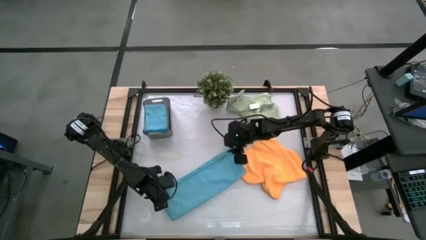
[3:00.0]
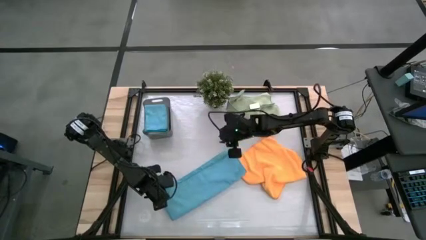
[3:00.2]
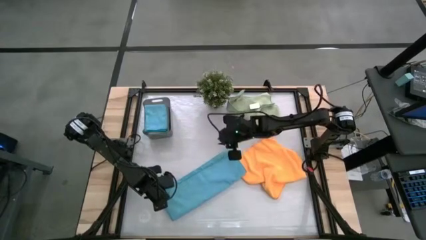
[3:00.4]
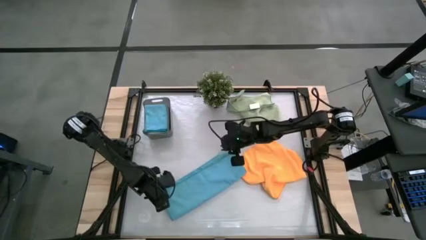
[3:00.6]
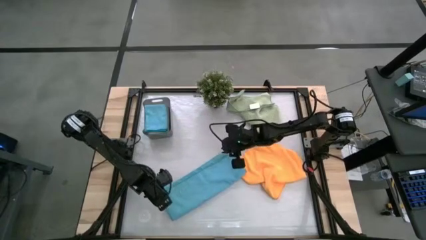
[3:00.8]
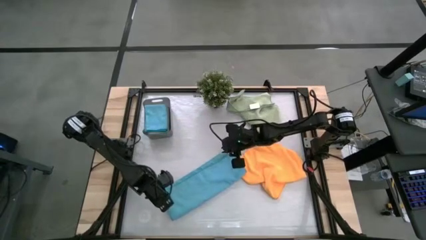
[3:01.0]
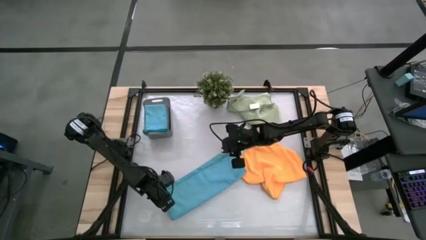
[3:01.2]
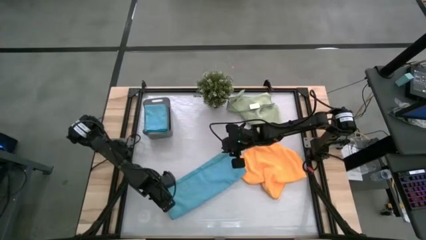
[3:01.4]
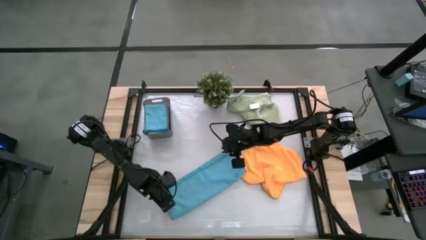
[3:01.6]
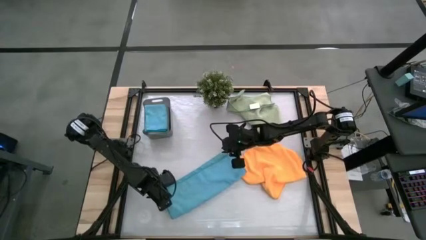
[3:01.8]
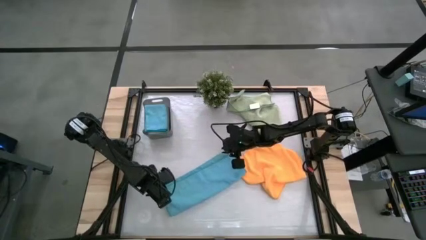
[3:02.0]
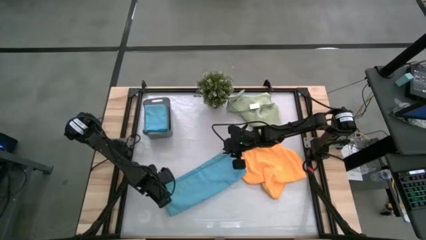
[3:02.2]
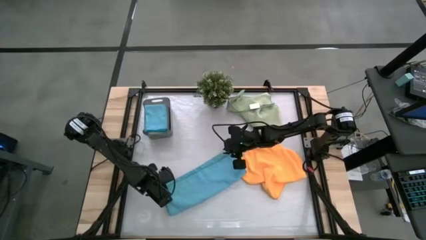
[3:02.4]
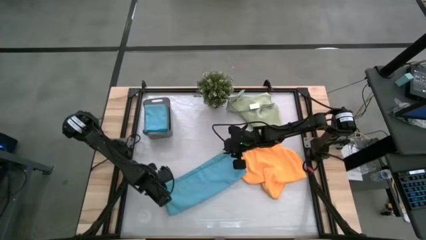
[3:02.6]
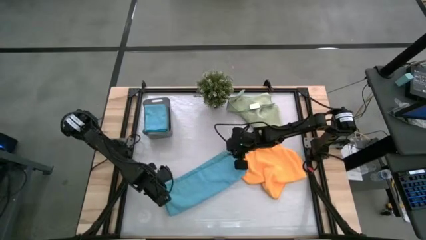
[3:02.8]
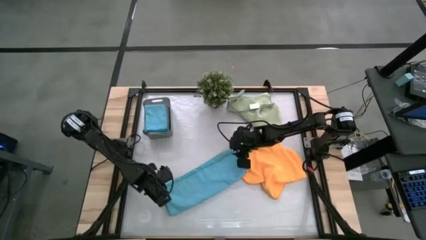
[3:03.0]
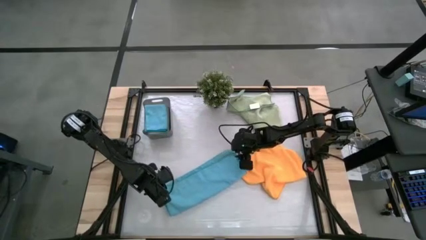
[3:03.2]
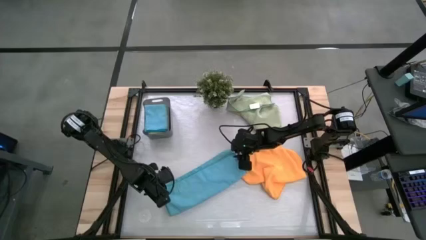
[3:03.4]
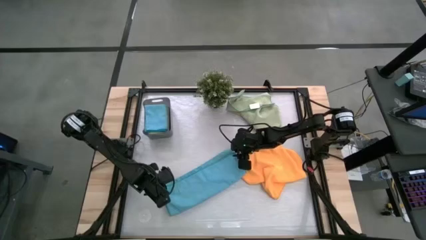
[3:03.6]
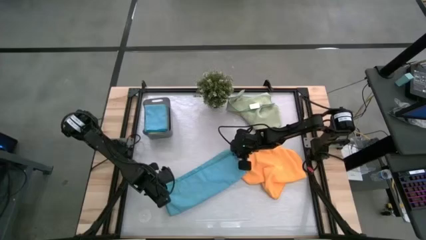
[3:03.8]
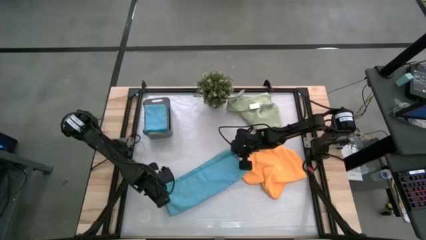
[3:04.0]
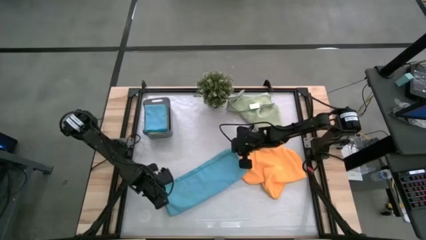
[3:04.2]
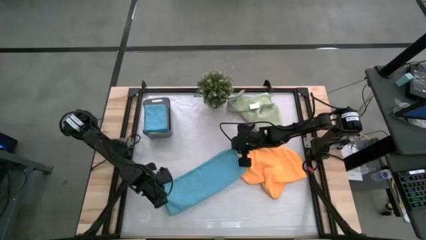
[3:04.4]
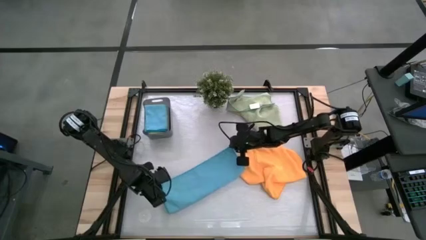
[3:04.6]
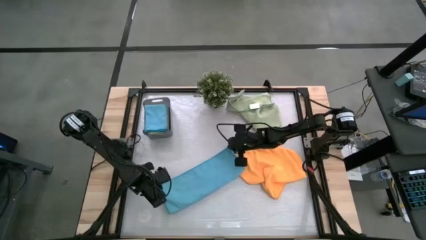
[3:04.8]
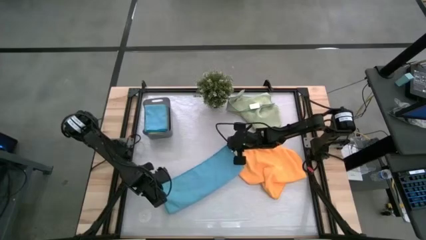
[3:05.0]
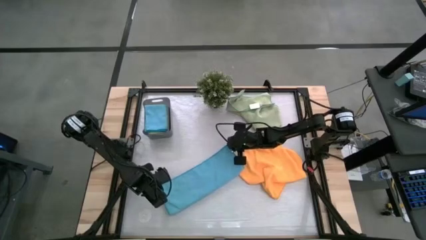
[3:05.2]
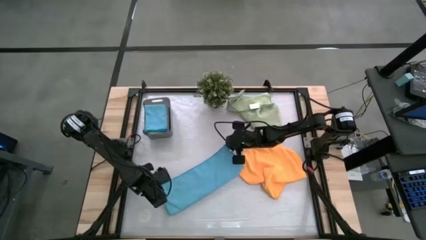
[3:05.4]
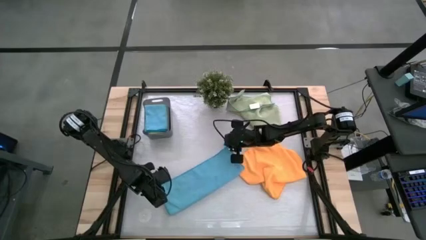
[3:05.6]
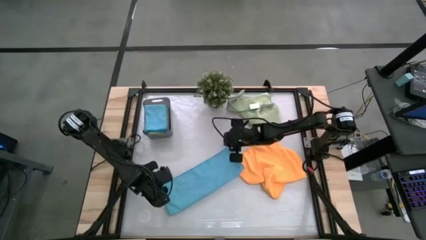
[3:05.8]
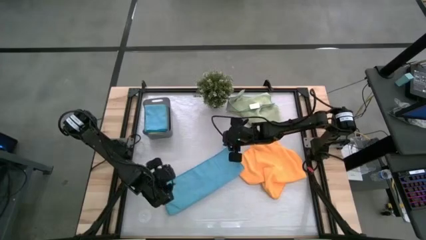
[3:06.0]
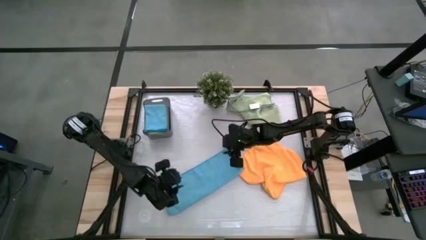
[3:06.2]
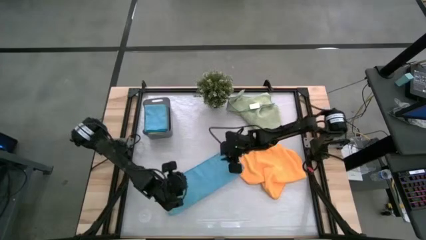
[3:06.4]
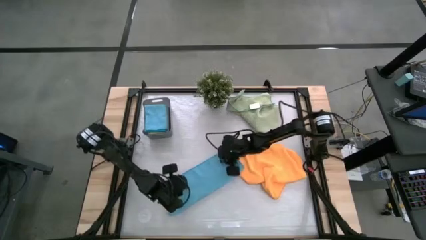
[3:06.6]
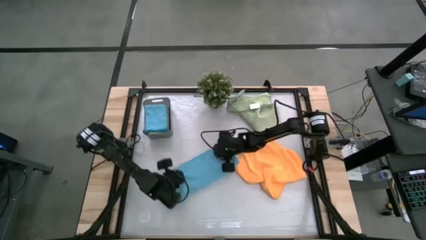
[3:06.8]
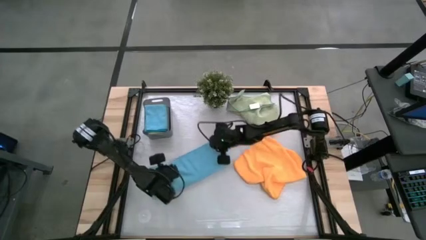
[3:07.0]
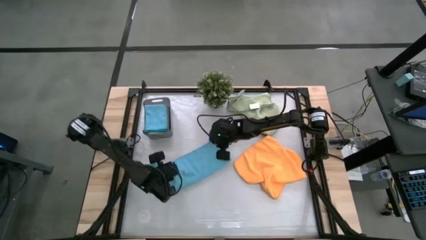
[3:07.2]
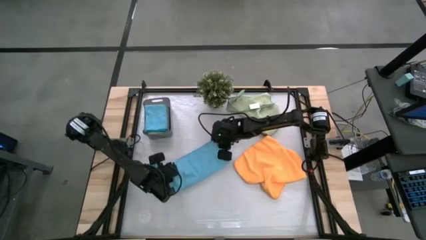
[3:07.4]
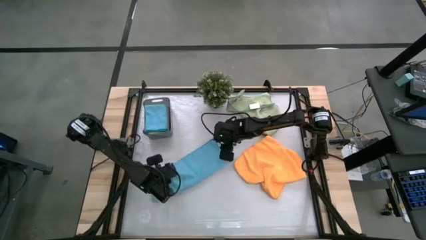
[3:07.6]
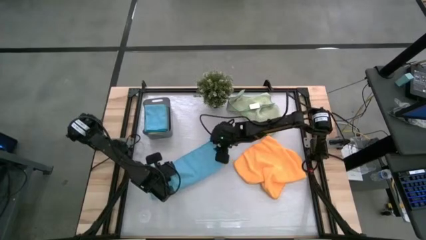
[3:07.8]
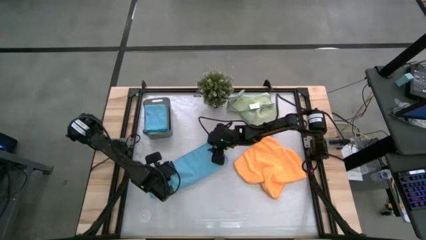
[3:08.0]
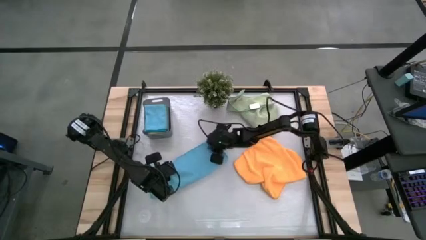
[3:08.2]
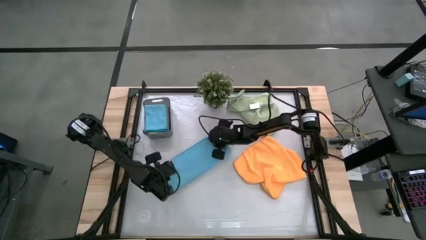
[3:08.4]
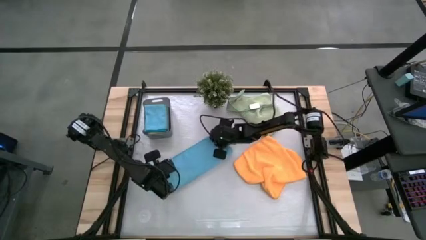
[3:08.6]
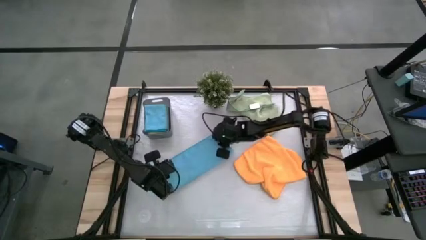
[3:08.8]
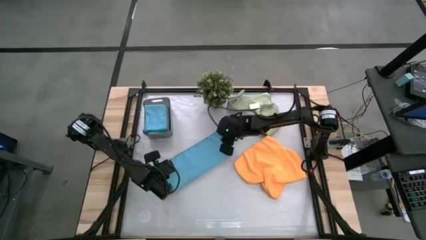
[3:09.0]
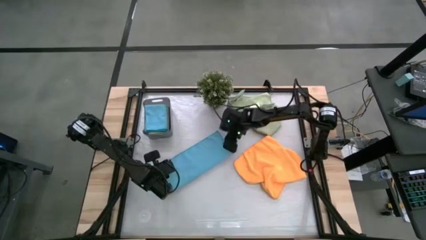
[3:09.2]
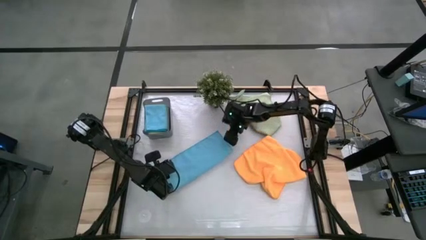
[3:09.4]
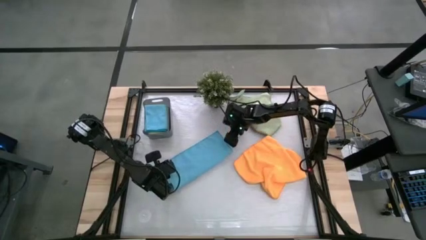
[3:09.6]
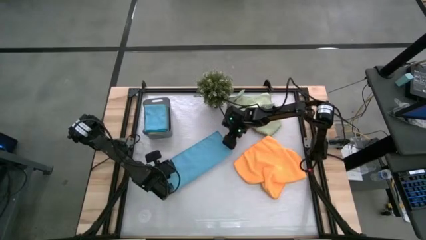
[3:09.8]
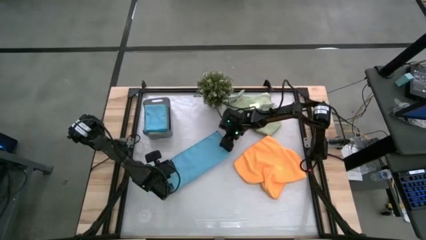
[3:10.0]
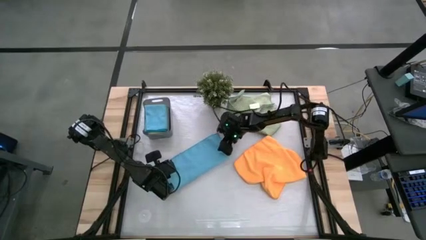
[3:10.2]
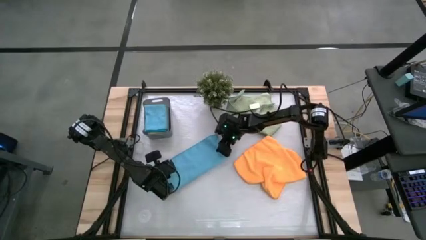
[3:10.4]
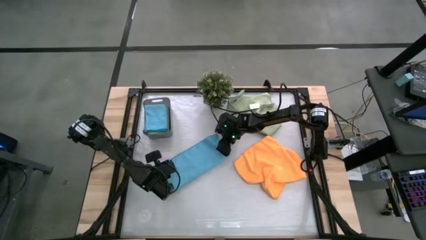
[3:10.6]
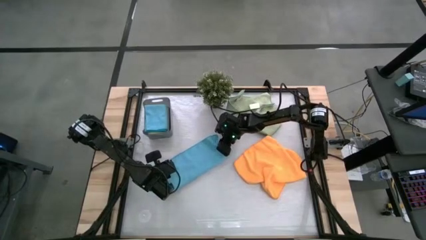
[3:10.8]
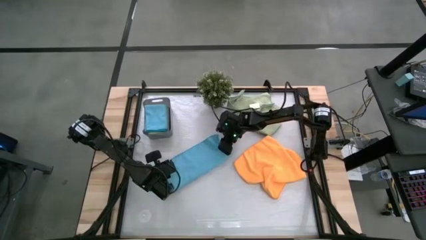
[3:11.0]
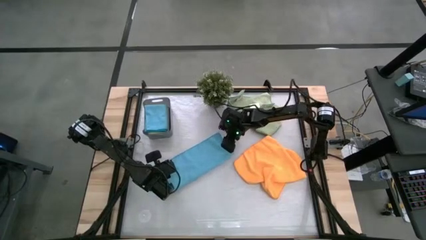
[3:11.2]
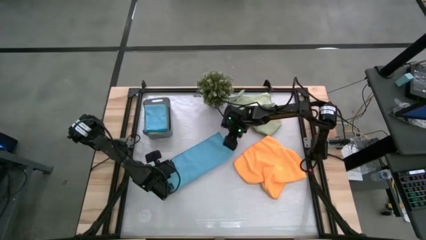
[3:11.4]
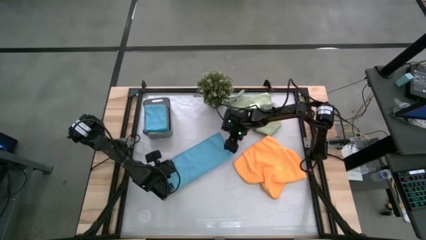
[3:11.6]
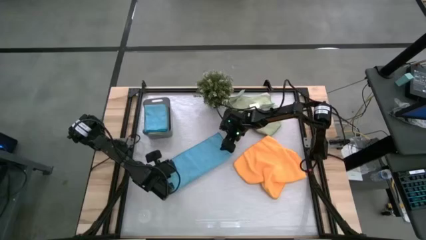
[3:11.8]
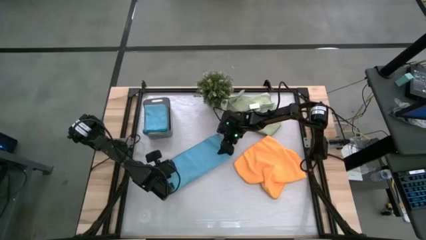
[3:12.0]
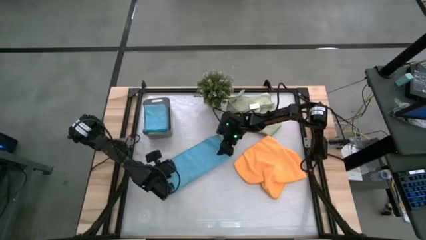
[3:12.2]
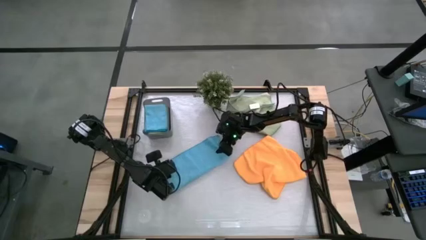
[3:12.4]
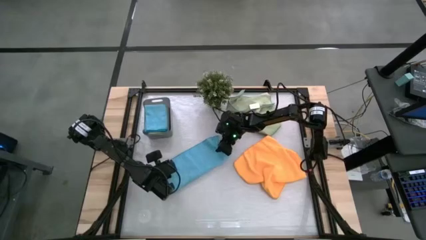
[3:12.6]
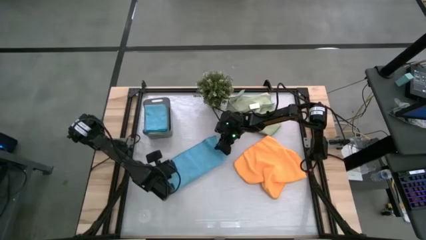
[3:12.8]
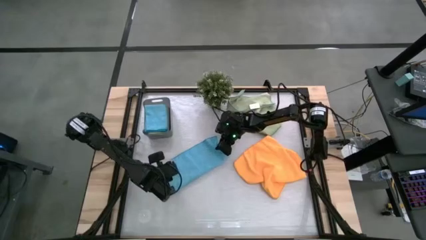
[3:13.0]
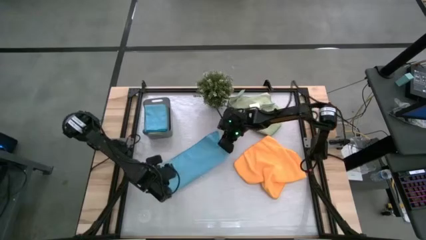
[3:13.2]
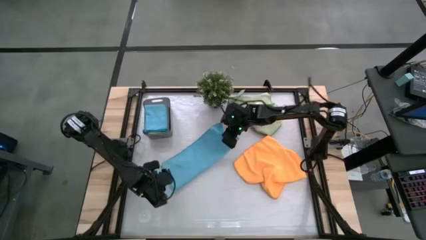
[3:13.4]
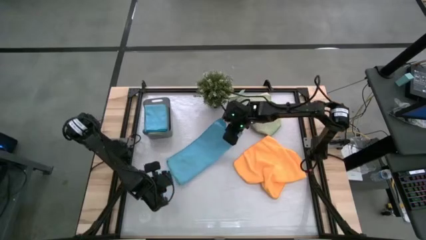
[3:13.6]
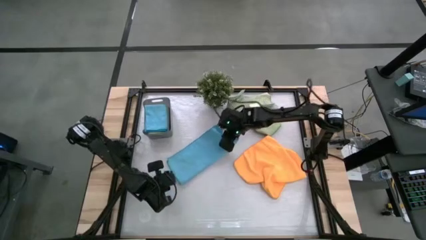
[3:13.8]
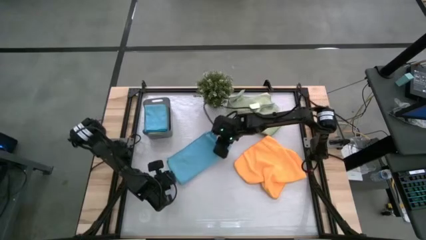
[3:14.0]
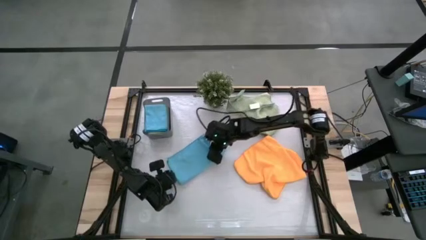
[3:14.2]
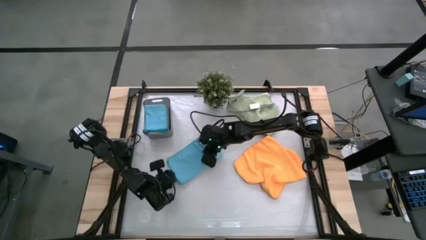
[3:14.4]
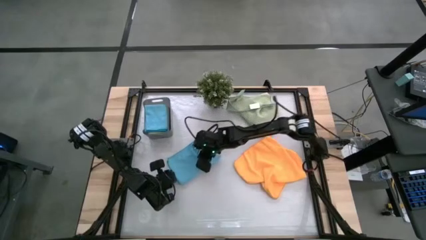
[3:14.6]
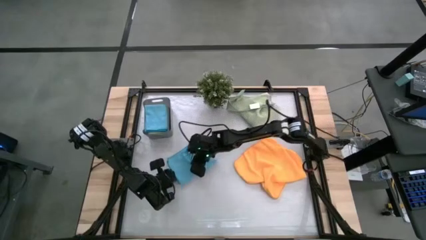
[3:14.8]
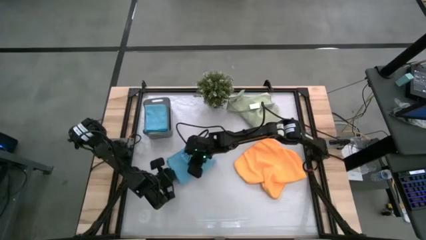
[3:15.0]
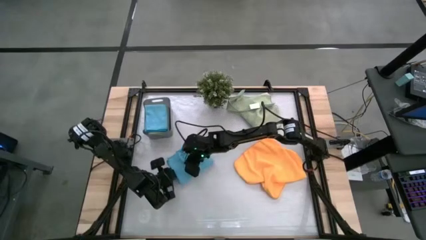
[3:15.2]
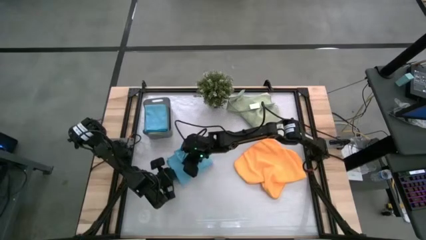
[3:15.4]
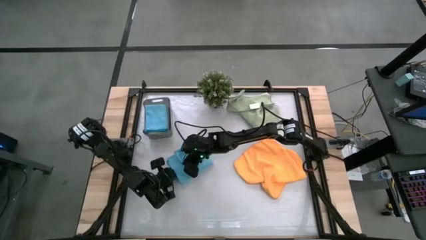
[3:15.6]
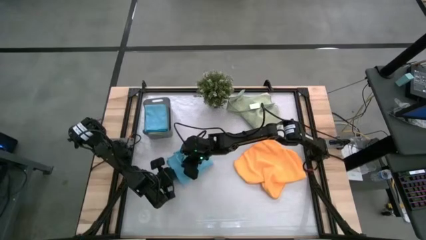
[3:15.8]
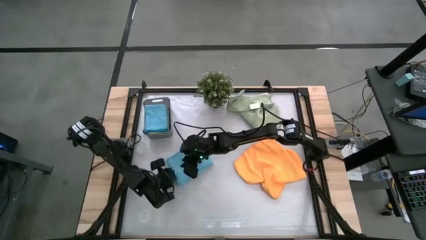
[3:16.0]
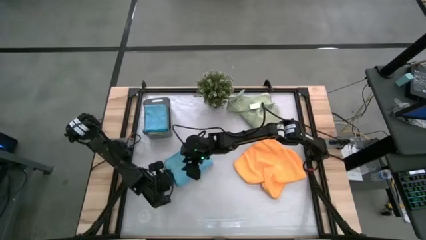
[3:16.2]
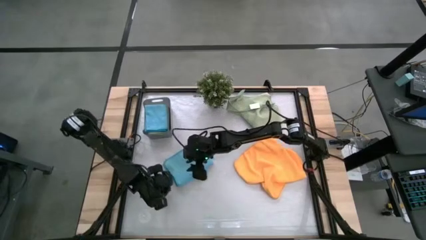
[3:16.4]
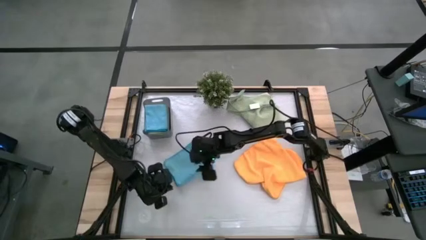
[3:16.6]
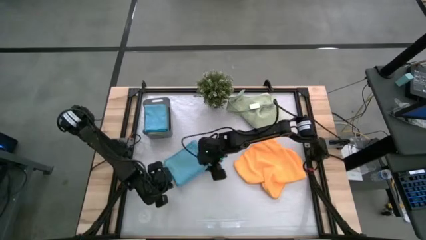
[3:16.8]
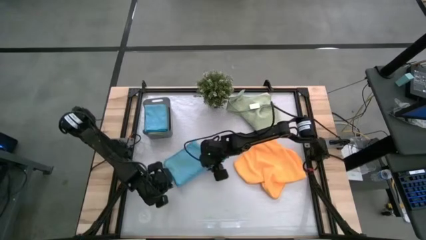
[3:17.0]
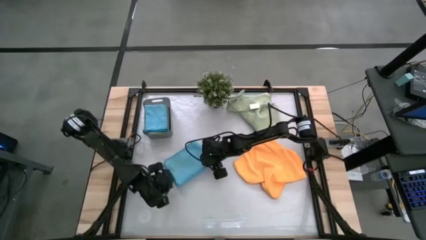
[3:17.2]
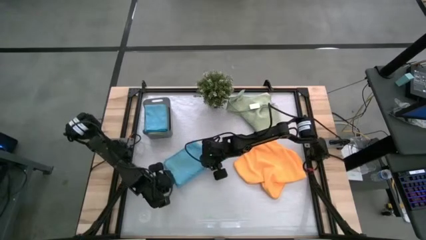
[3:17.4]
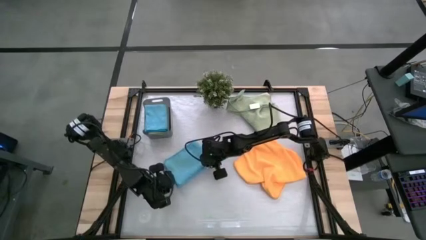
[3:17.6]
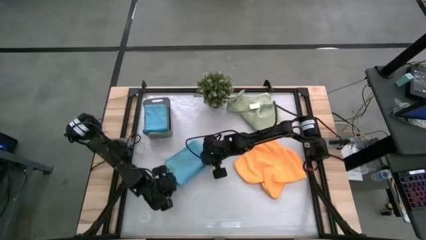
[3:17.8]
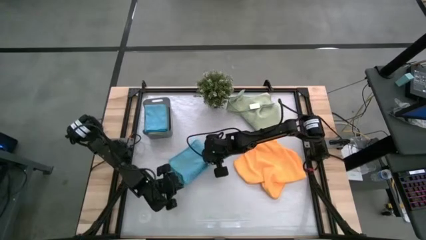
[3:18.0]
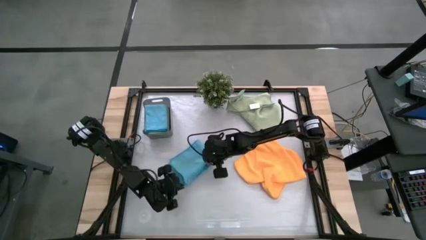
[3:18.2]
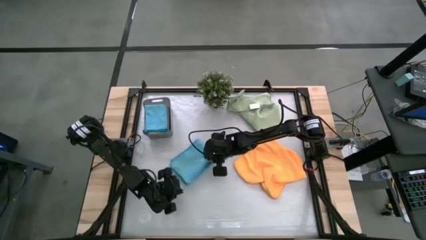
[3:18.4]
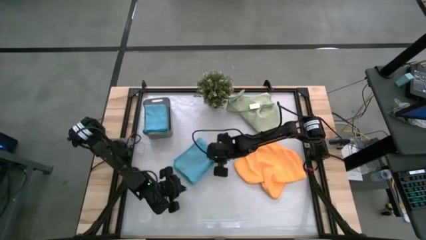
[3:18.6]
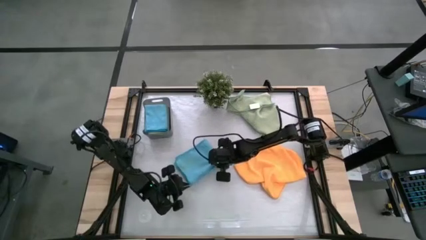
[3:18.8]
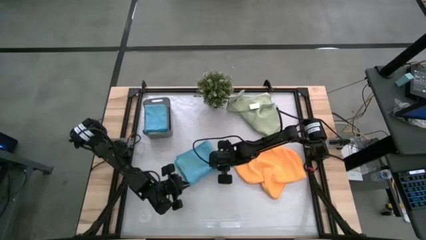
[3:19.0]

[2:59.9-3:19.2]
Task: Fold microfiber towels
Fold the blue microfiber cloth
